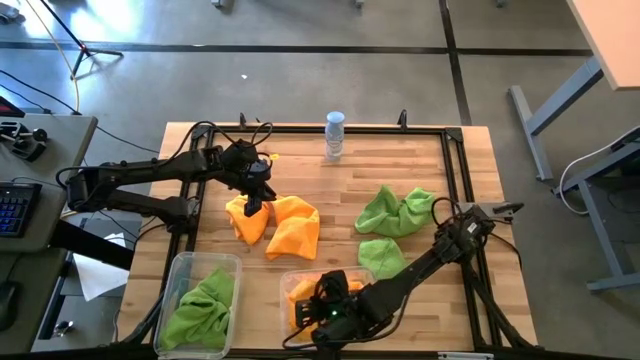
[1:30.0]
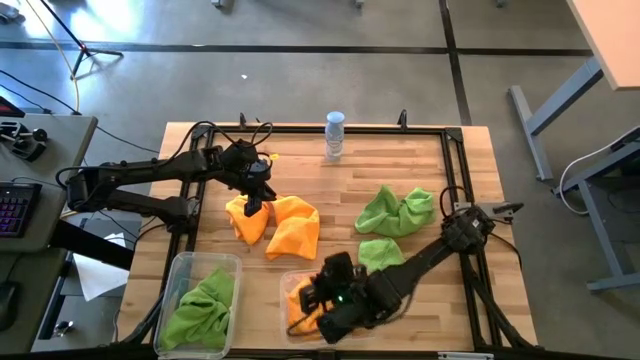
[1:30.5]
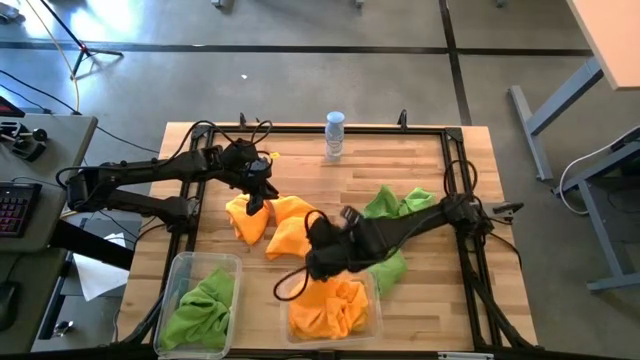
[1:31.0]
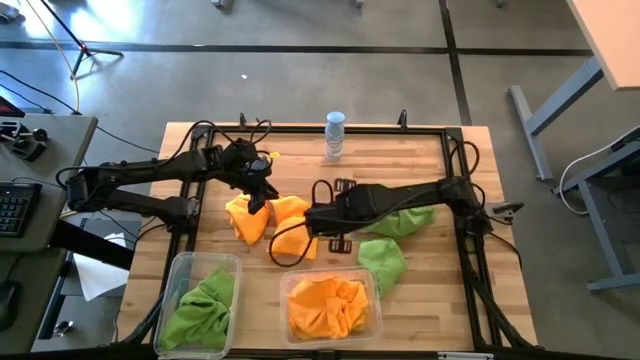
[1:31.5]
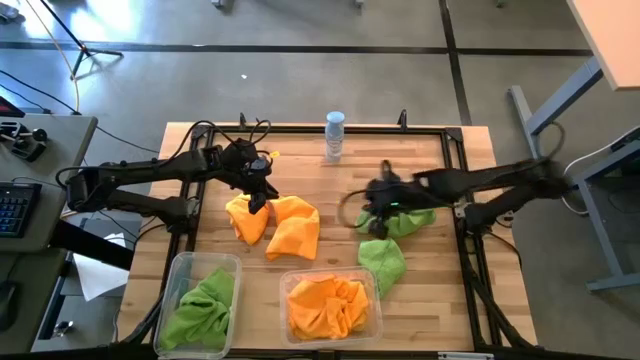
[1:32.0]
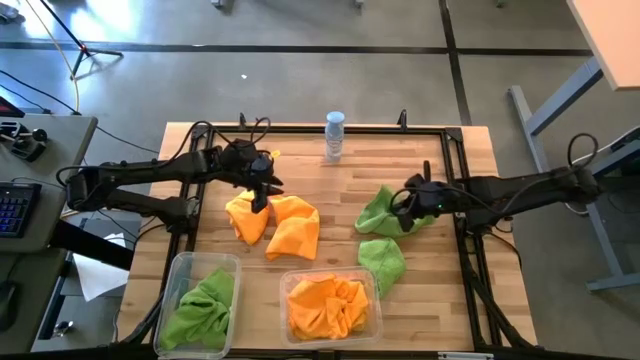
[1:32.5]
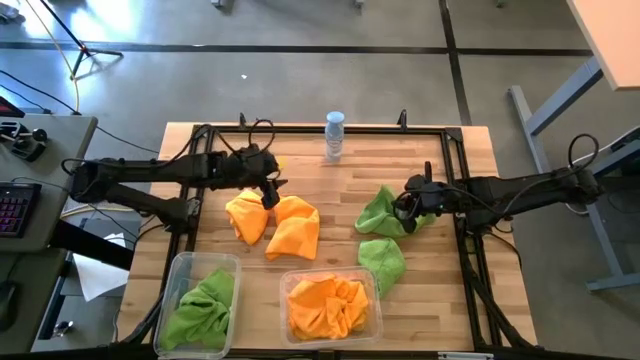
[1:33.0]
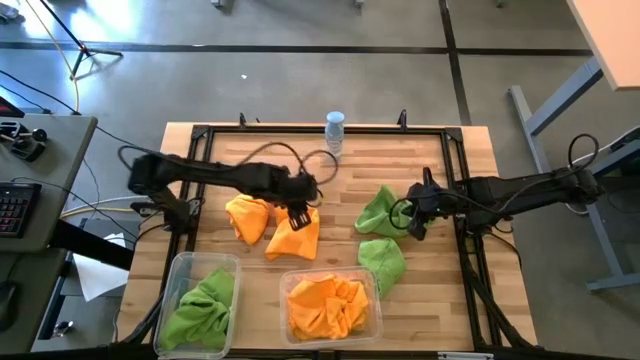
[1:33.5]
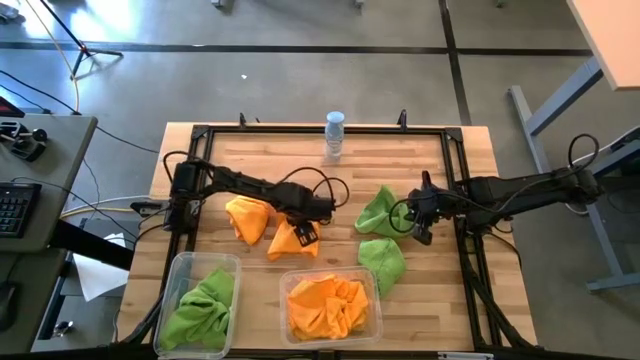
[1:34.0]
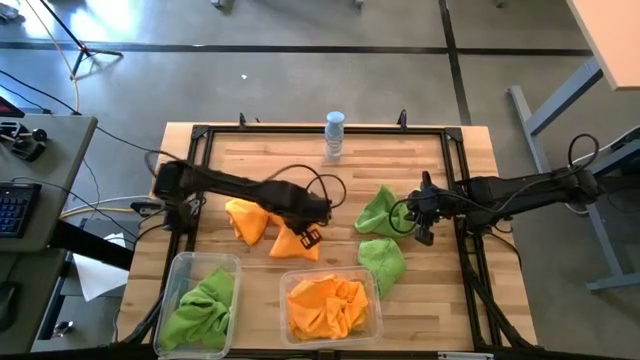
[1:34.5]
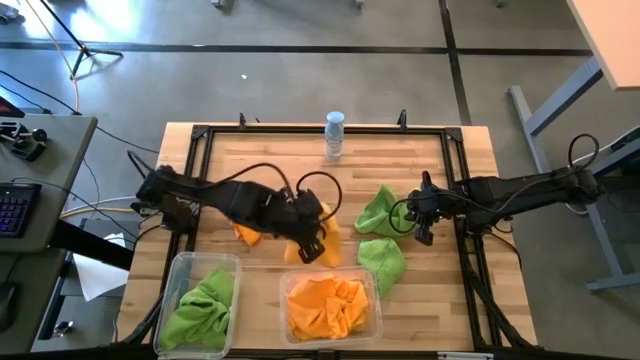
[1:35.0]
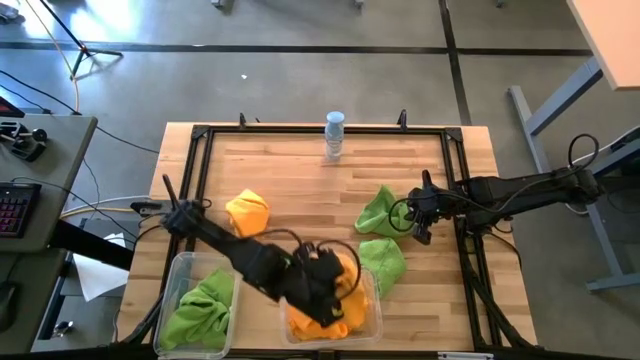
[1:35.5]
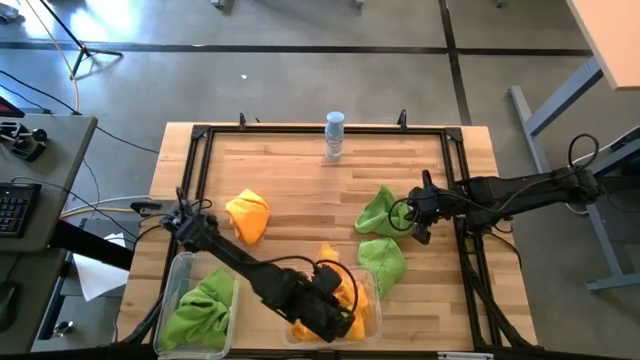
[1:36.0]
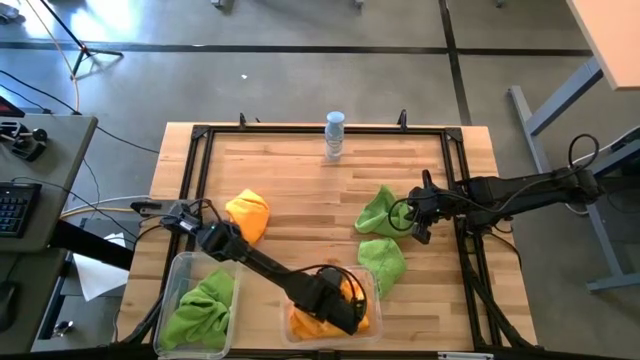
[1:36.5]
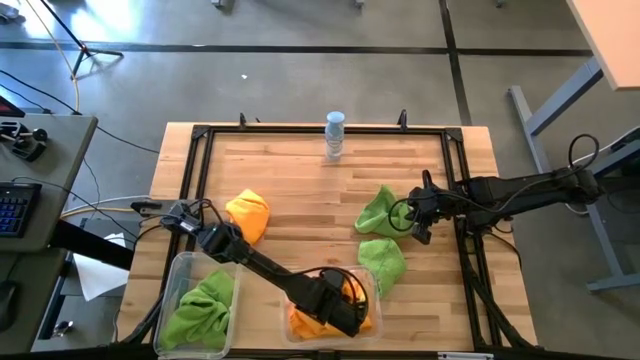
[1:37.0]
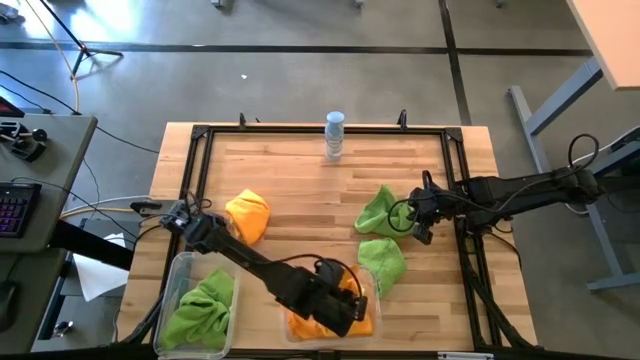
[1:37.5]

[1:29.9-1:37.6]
Task: Sort microfiber towel by color & place in baskets
Put the orange microfiber towel into the right transparent bin

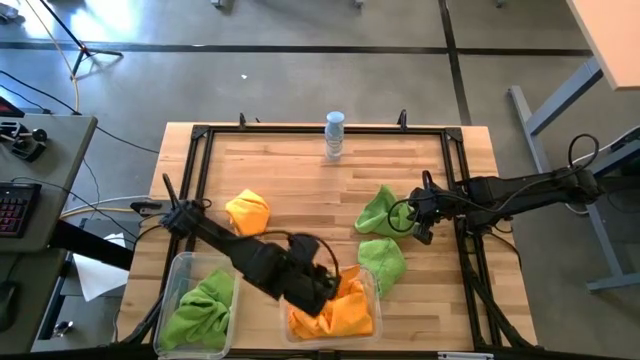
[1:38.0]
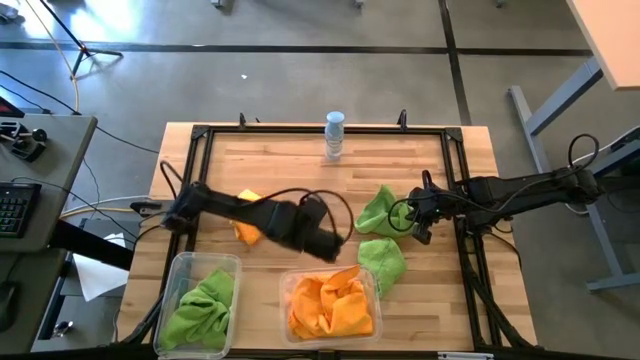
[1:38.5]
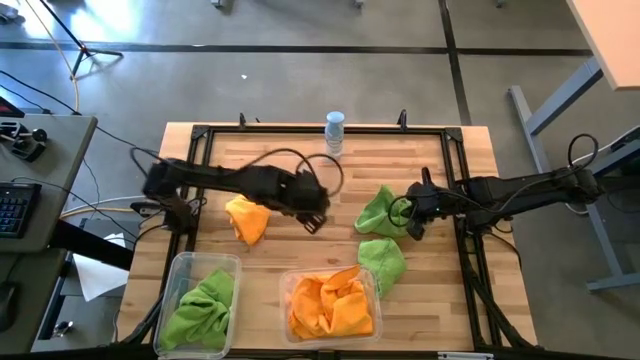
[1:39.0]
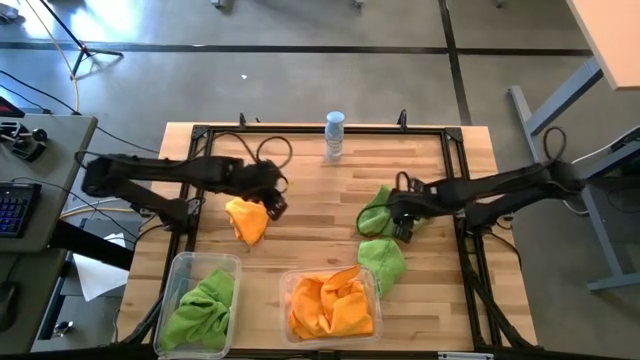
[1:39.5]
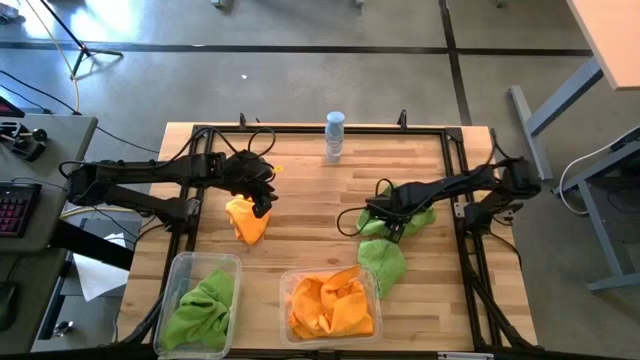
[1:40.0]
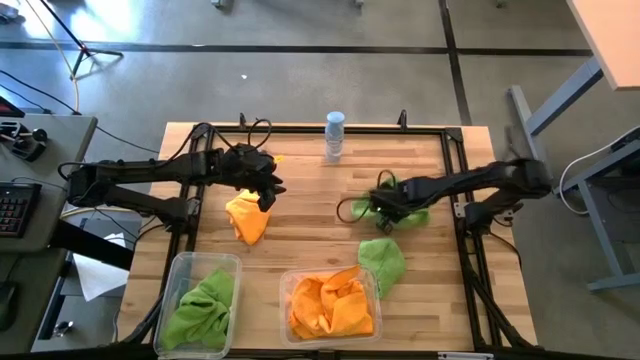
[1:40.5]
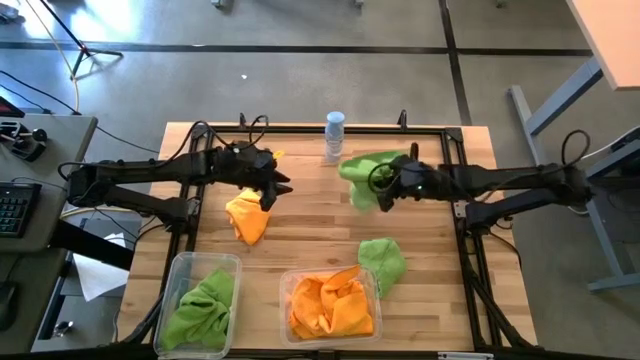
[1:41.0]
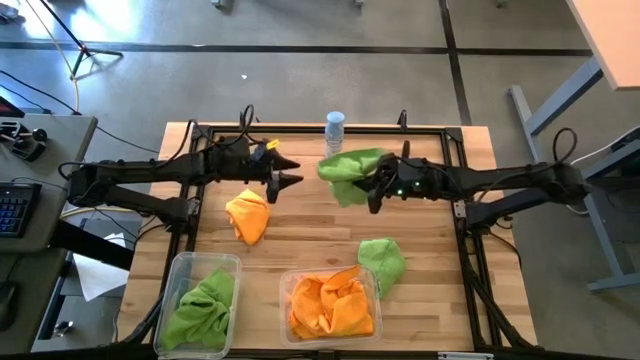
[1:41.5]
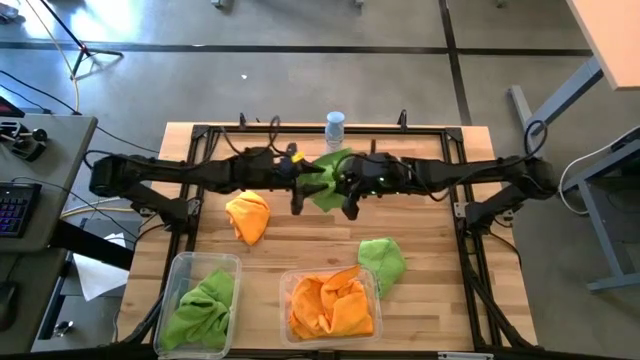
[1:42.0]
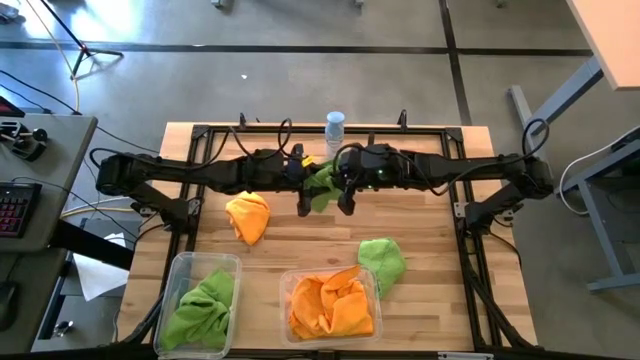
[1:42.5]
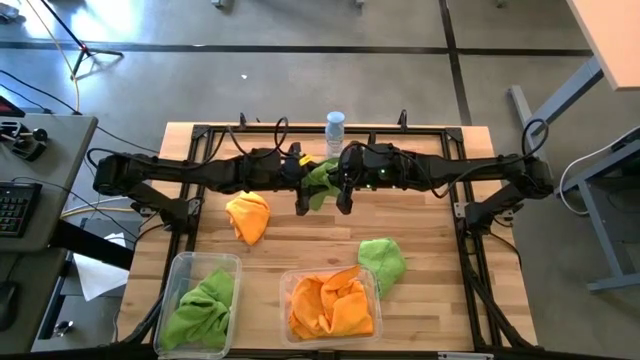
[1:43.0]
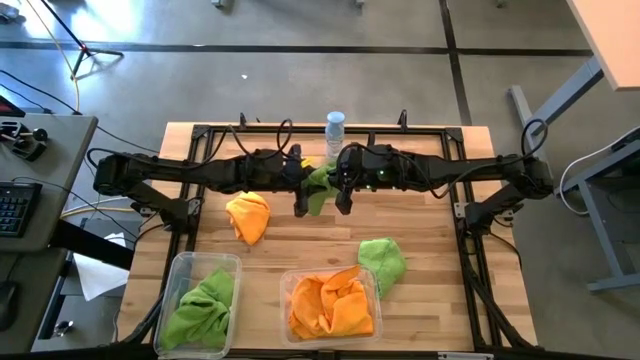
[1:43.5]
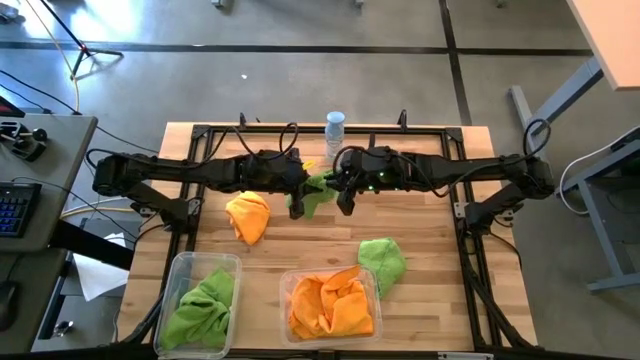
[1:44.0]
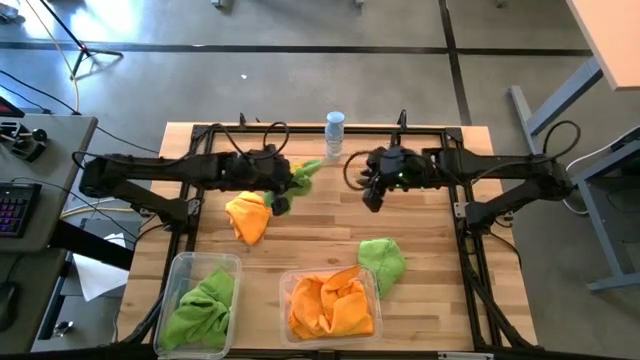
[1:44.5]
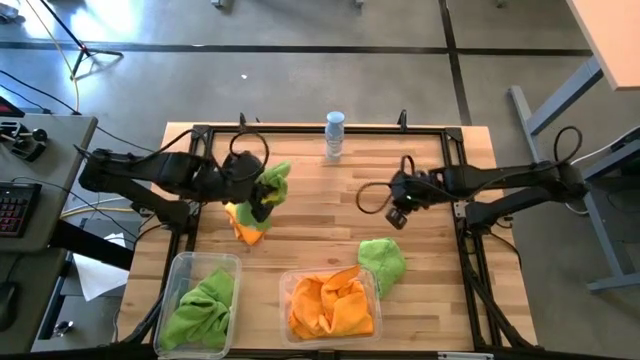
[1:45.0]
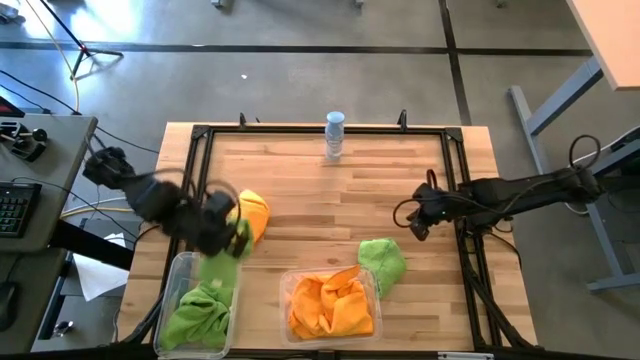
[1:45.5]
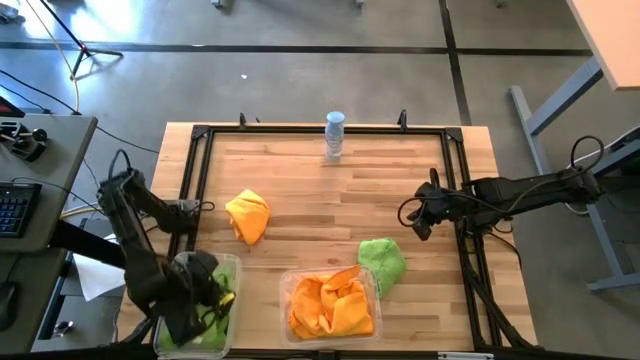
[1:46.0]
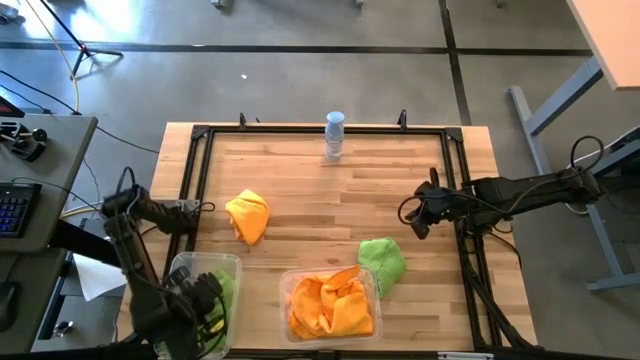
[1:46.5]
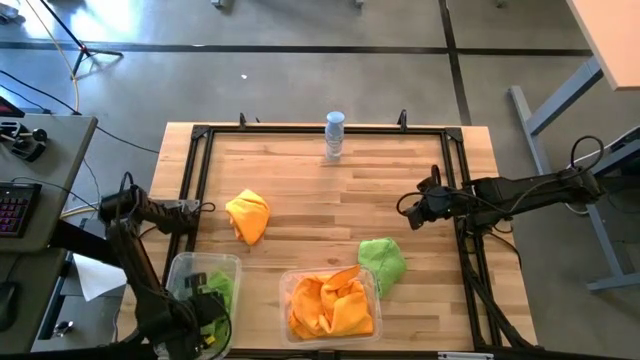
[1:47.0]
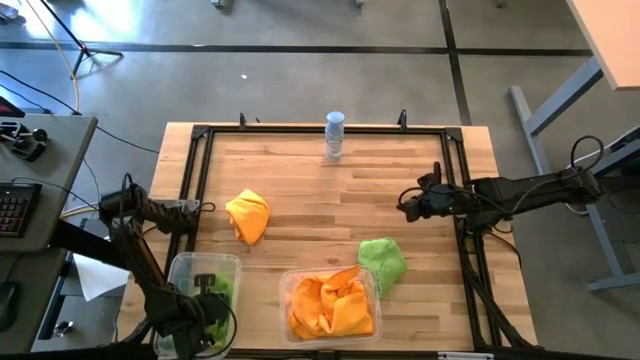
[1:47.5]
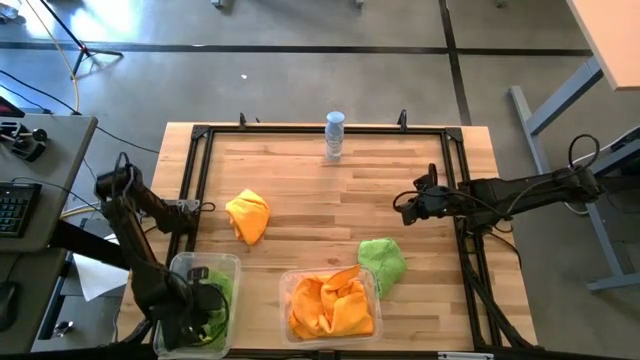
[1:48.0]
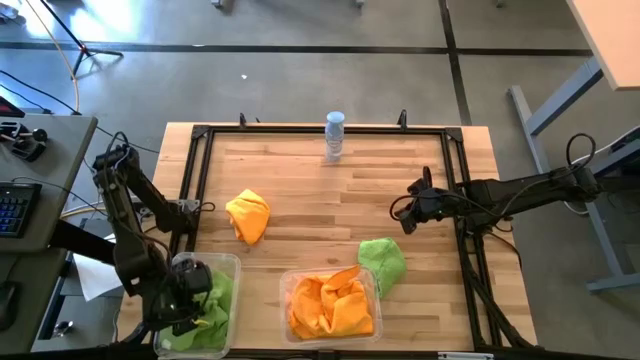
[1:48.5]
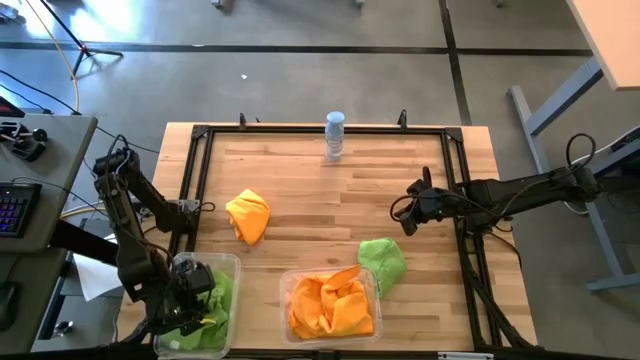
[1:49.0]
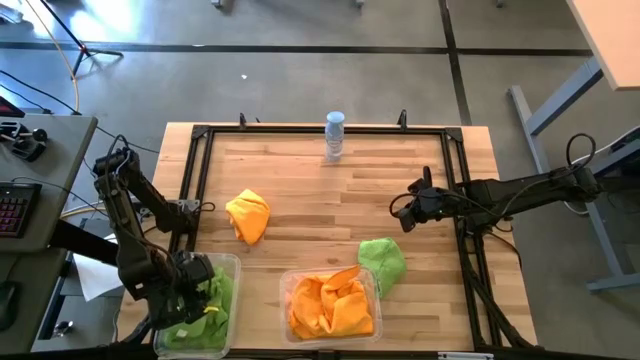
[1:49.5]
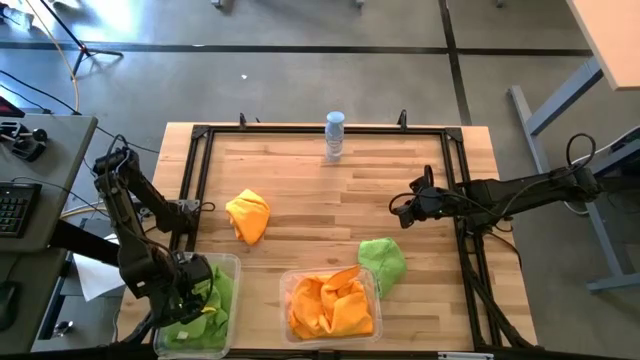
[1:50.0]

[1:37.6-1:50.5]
Put the green microfiber towel into the left transparent bin
